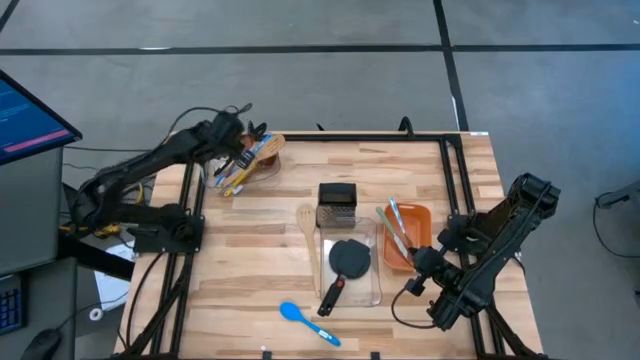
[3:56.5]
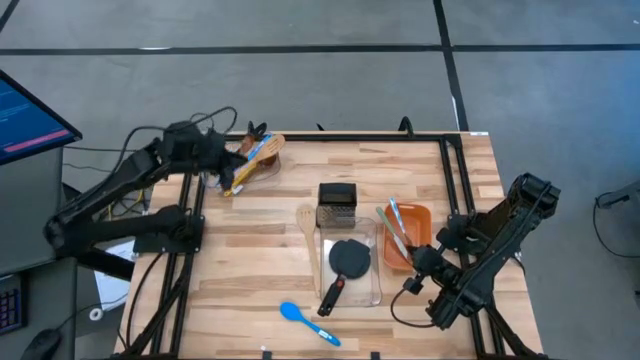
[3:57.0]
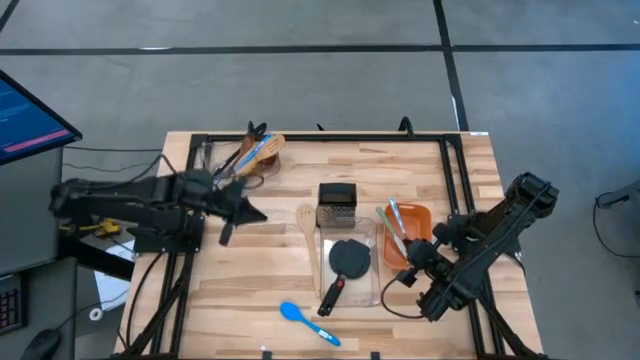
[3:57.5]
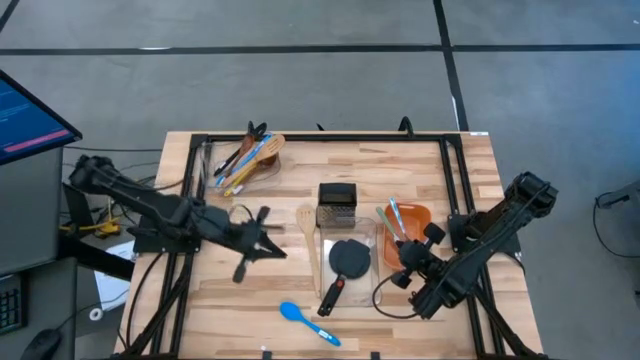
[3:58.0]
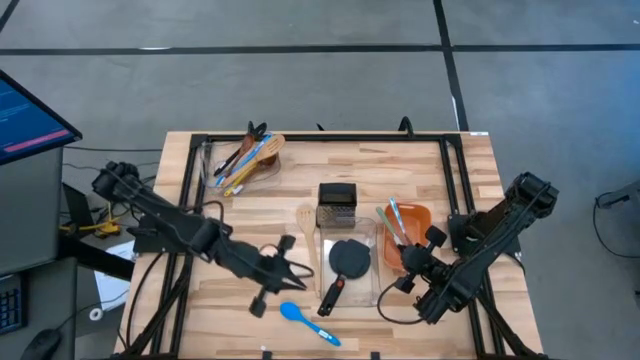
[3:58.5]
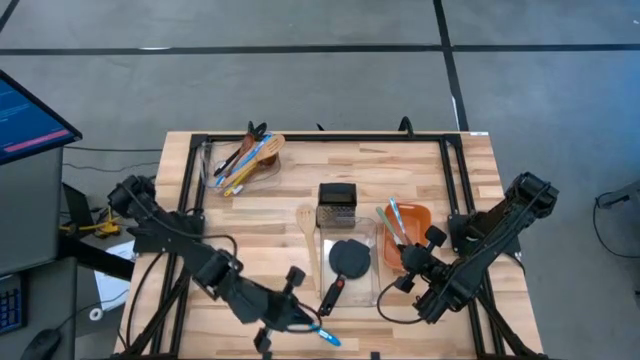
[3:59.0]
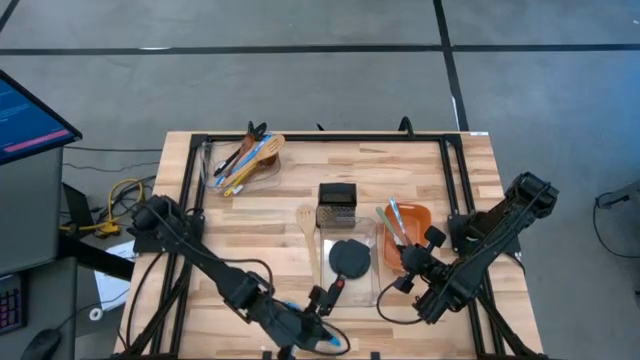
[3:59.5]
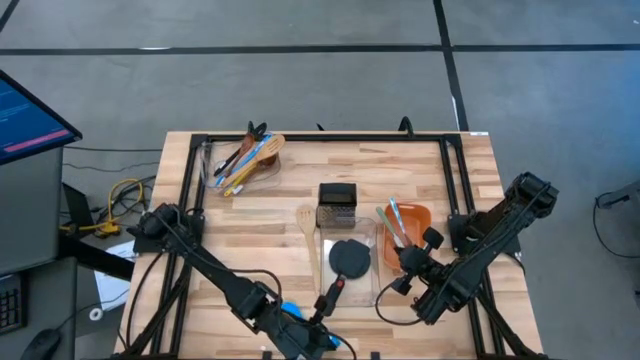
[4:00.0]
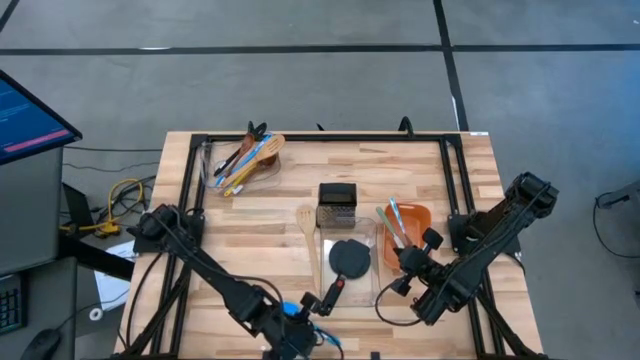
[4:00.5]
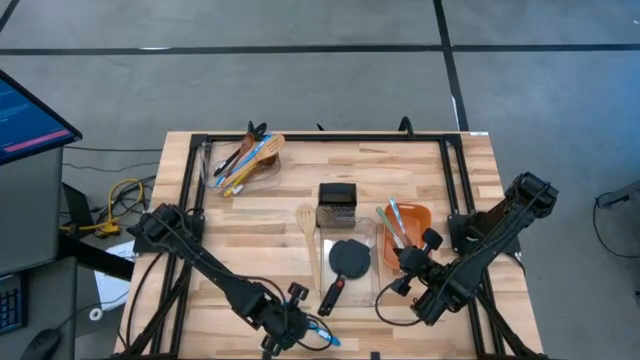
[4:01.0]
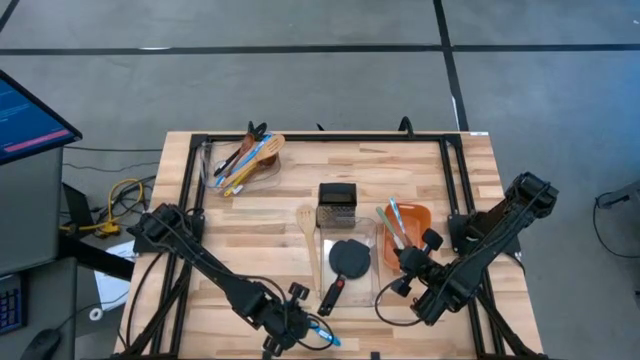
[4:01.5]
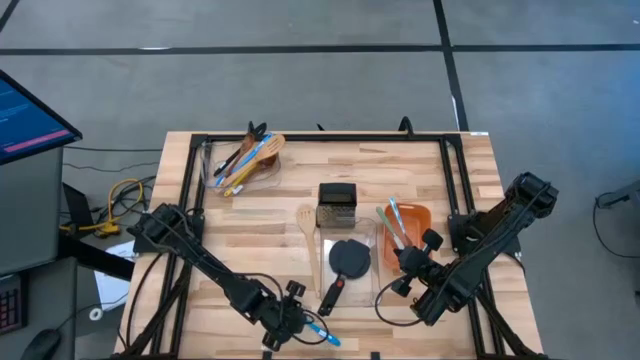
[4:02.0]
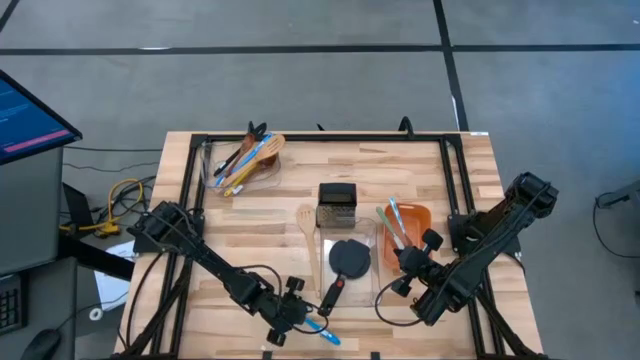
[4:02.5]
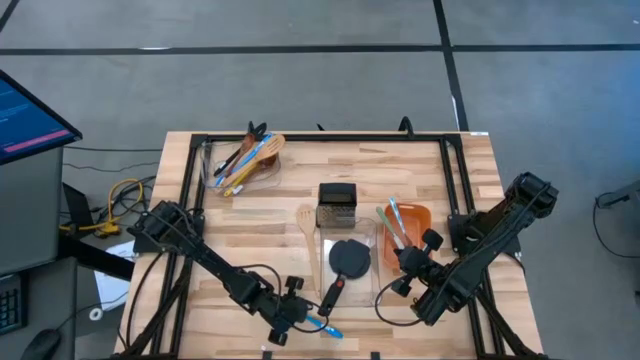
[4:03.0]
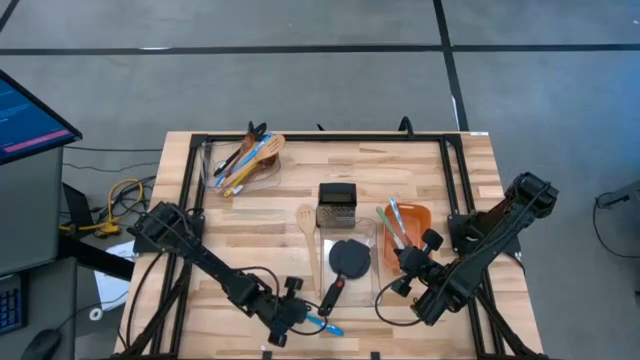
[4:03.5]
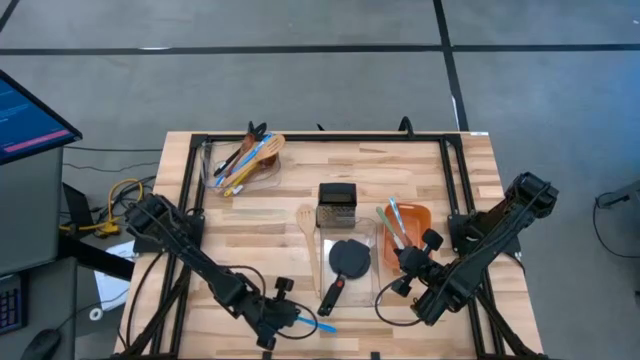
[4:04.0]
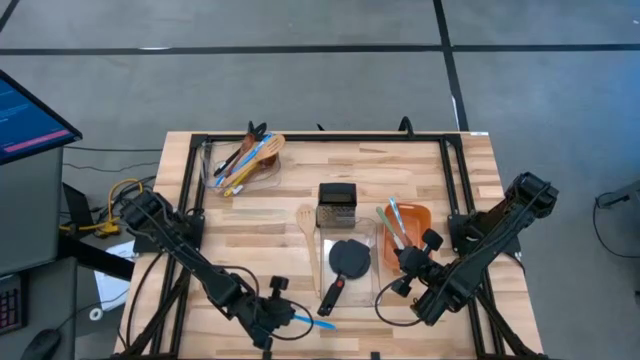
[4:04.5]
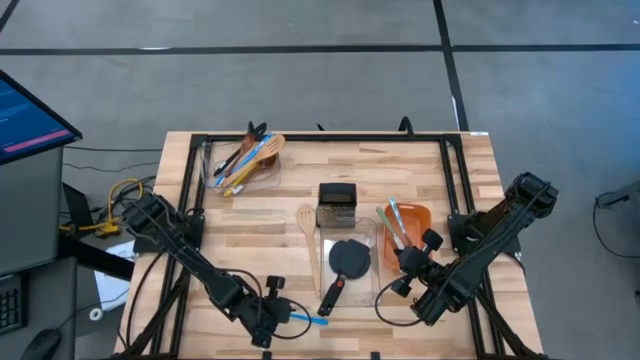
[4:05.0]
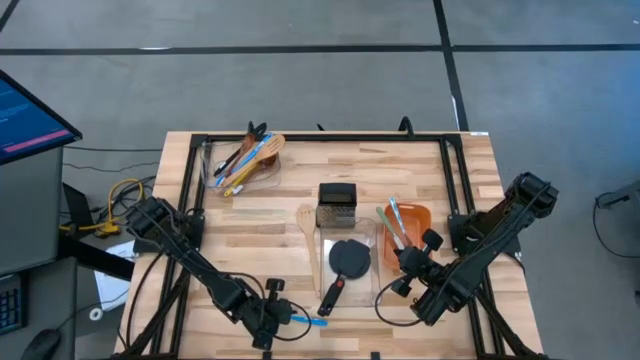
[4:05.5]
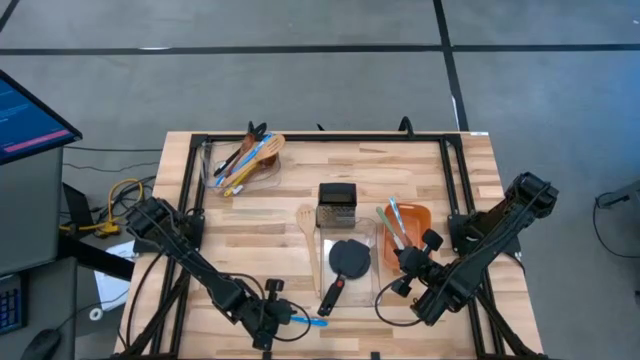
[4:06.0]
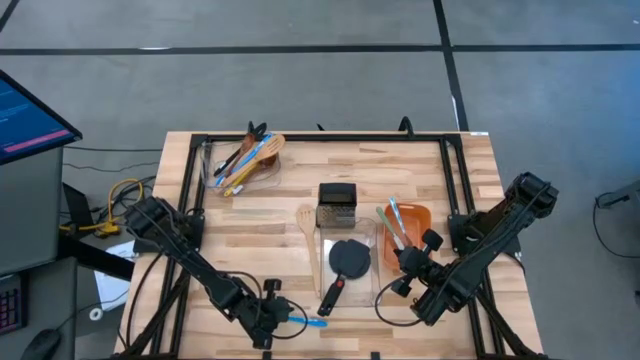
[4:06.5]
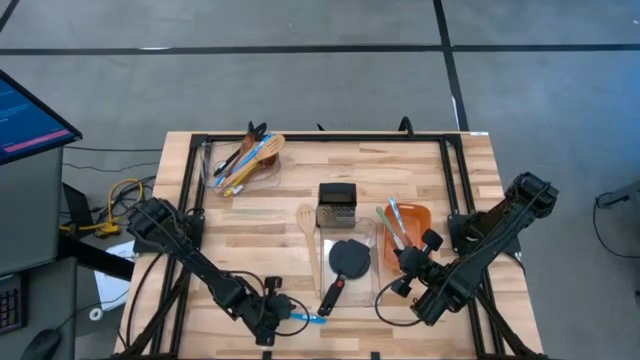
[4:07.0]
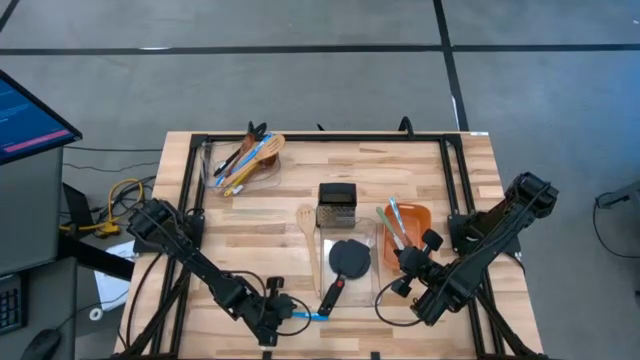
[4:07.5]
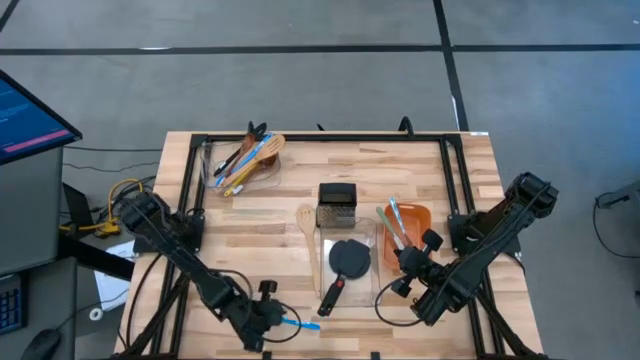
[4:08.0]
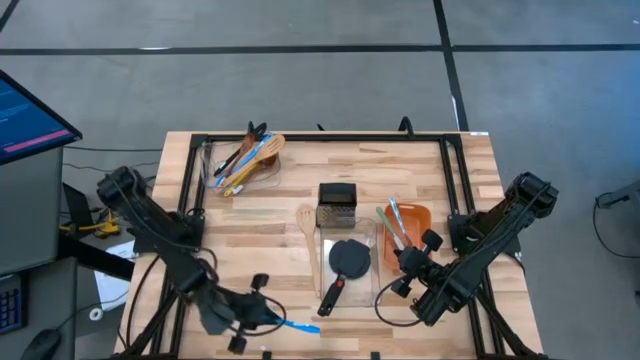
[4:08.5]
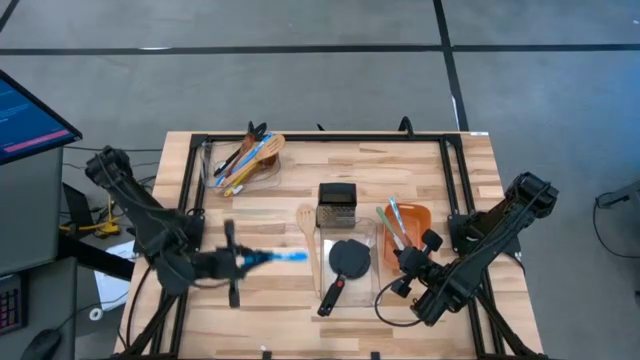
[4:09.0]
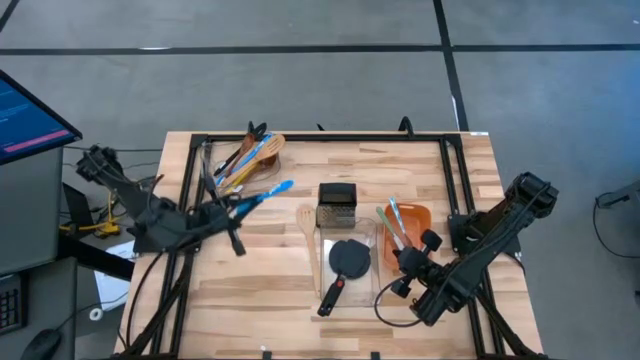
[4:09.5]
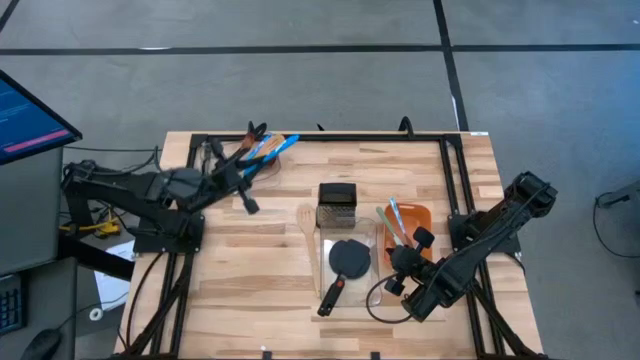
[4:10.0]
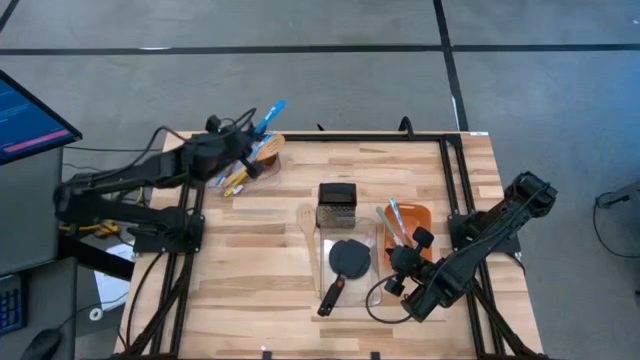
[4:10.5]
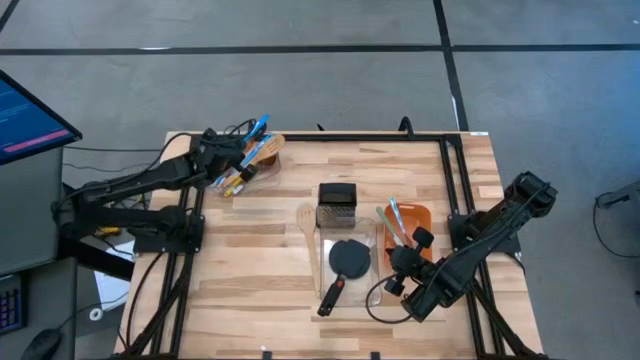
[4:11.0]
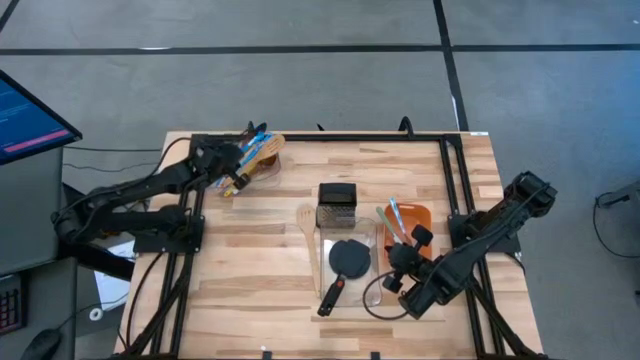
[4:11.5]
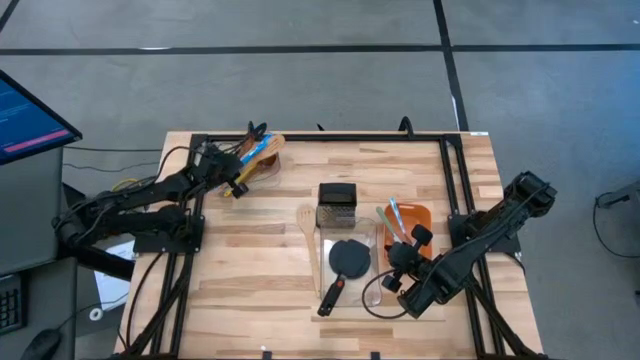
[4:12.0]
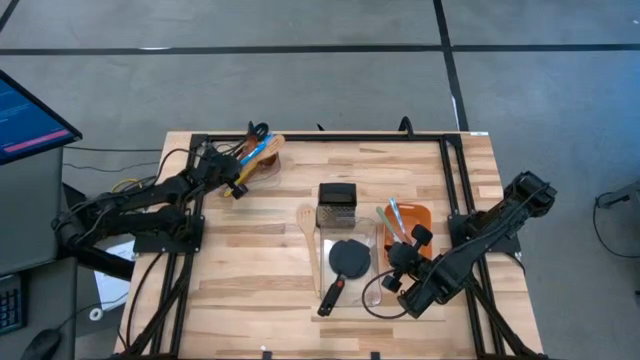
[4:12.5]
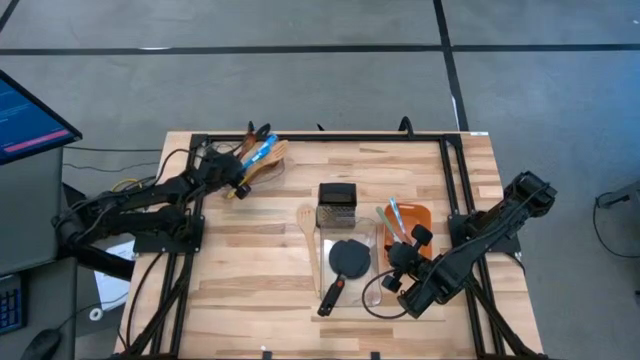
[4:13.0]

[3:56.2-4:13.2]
Task: Pick & Place Kitchen Items
Put the blue ladle into the top transparent bin

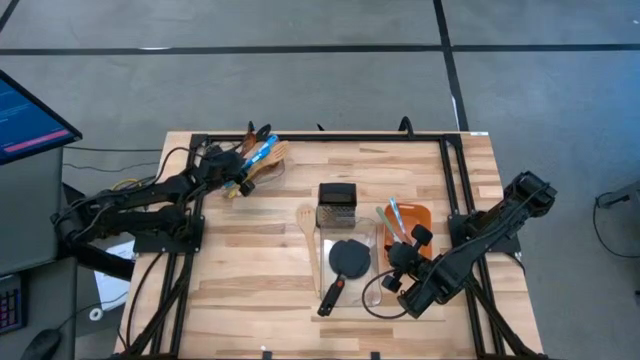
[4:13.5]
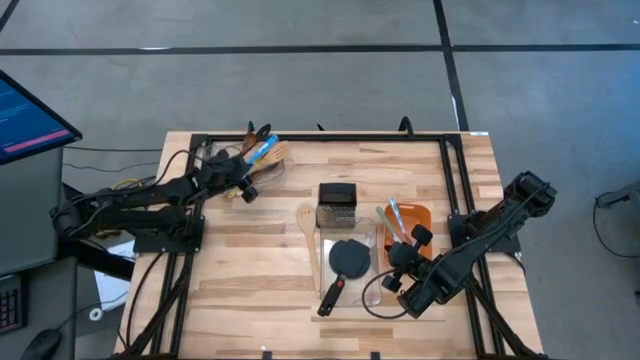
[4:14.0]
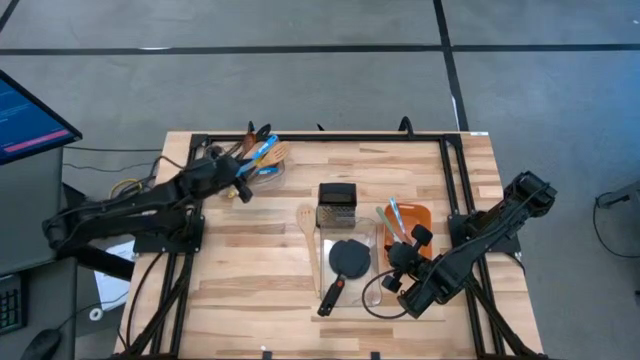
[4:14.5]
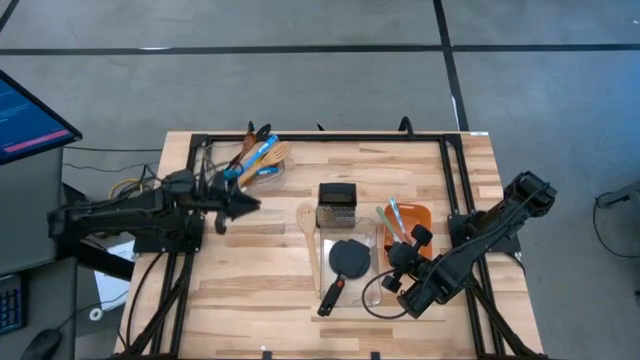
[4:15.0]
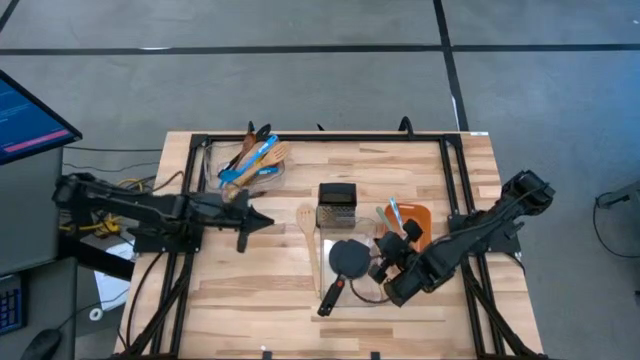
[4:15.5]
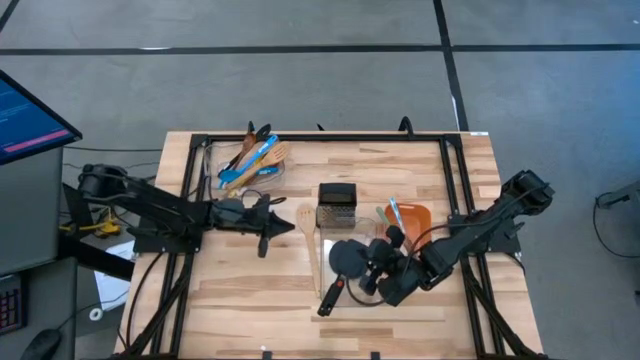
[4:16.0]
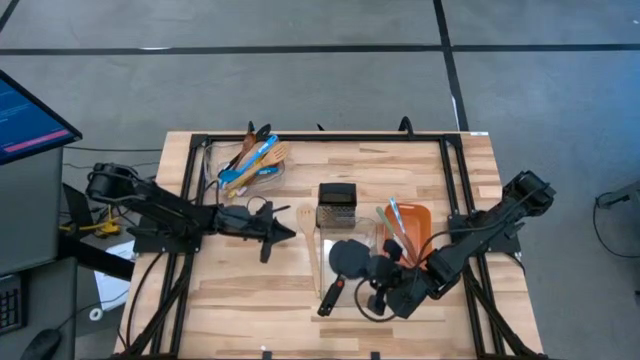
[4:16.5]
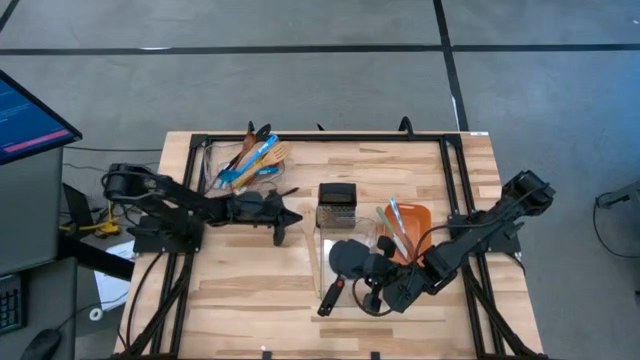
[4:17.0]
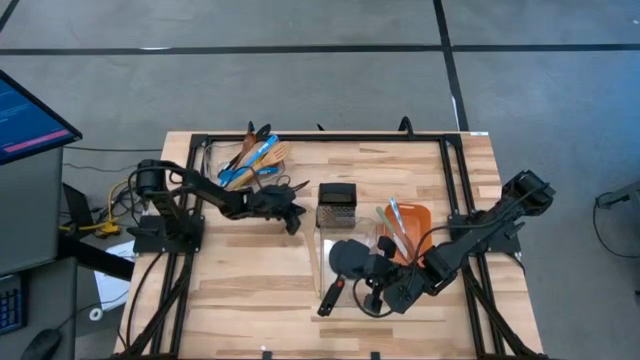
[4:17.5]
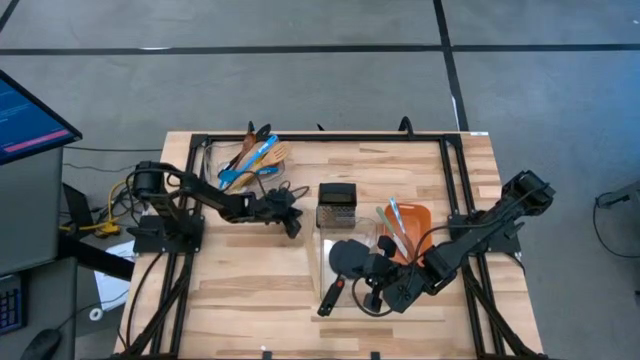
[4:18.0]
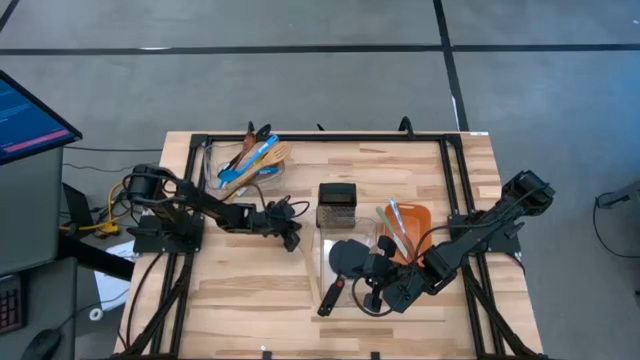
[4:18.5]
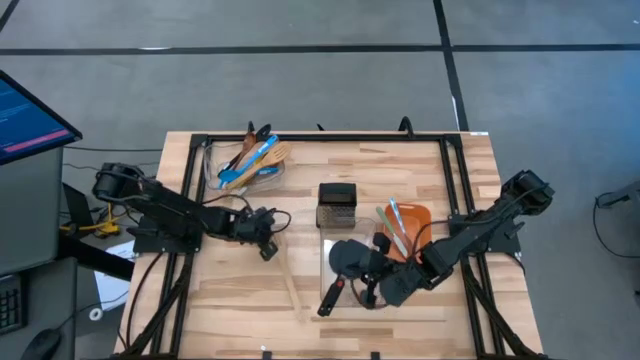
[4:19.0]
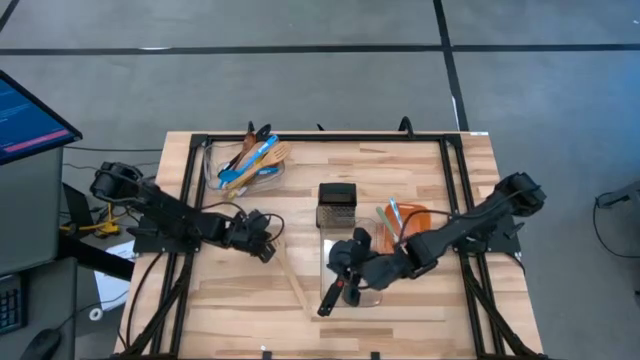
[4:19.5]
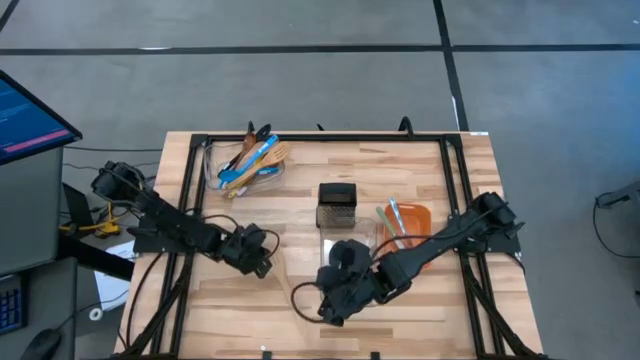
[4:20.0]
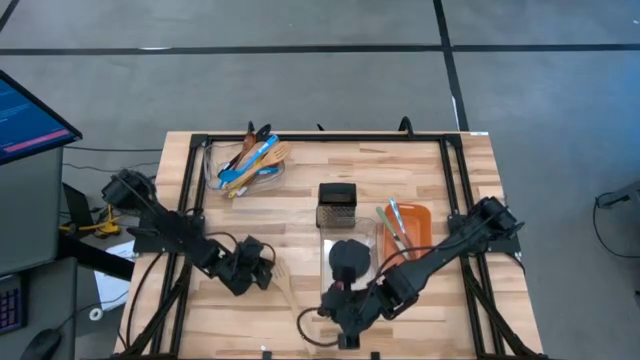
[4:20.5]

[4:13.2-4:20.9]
Move the brown ladle to the bottom center of the table
